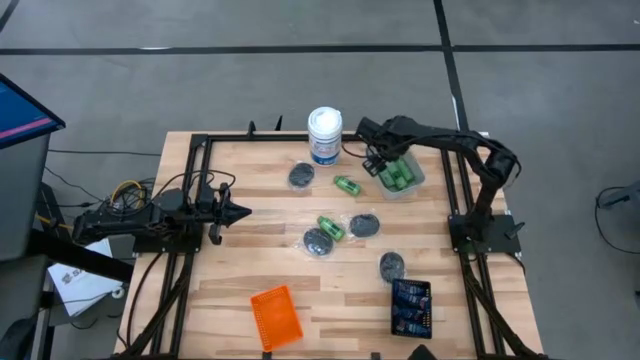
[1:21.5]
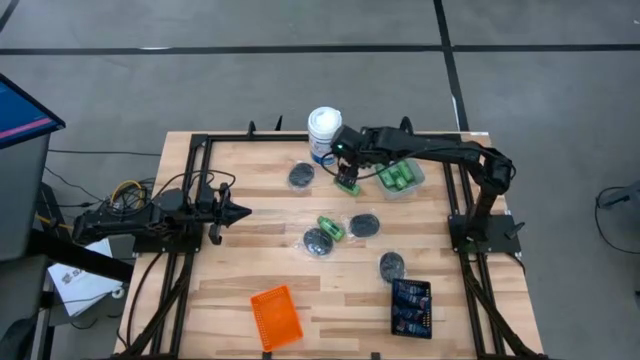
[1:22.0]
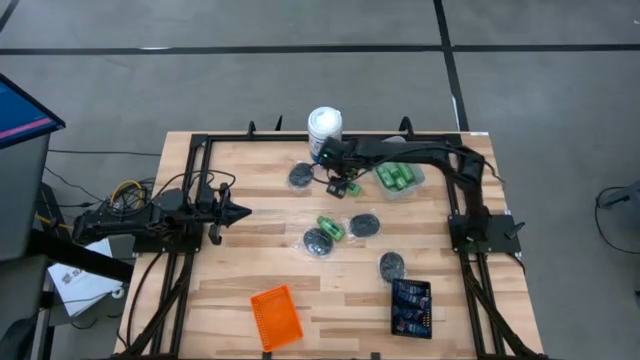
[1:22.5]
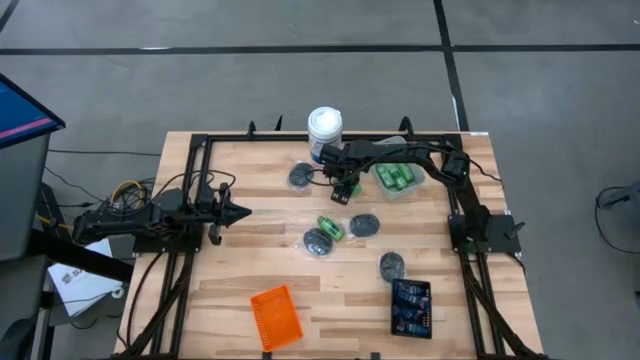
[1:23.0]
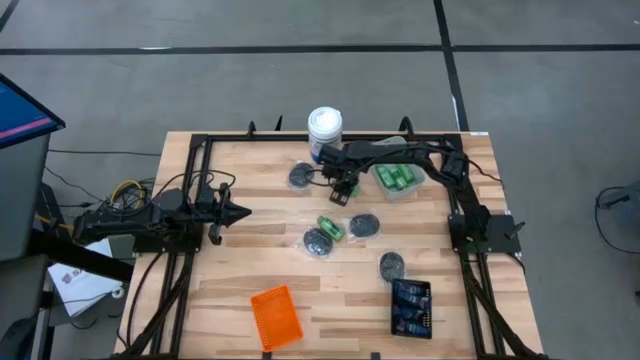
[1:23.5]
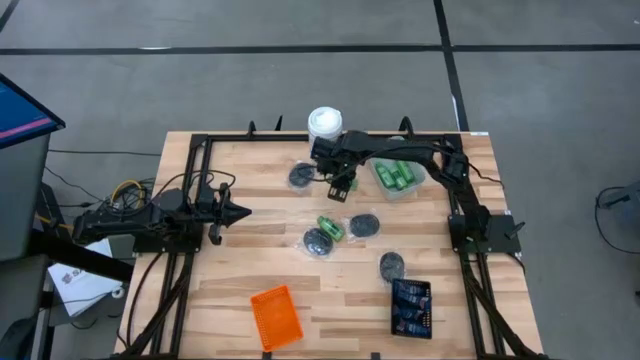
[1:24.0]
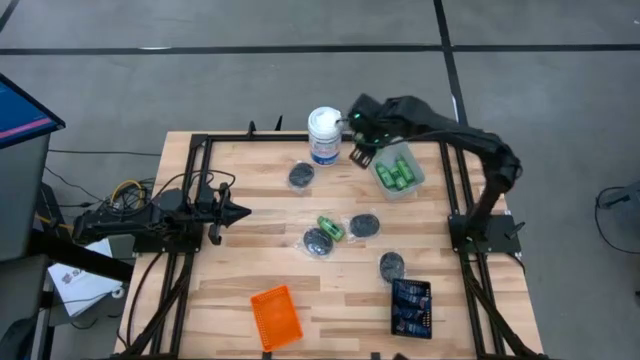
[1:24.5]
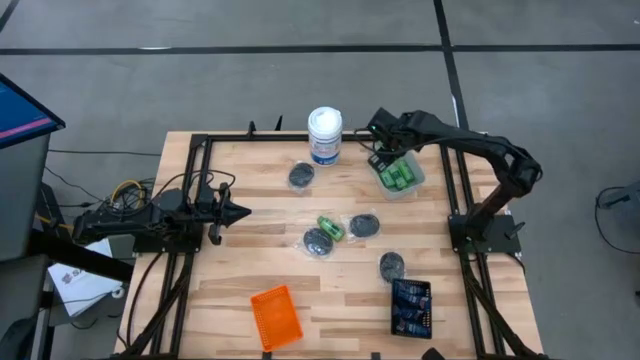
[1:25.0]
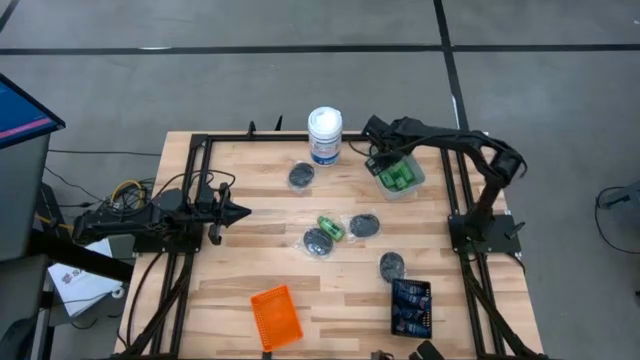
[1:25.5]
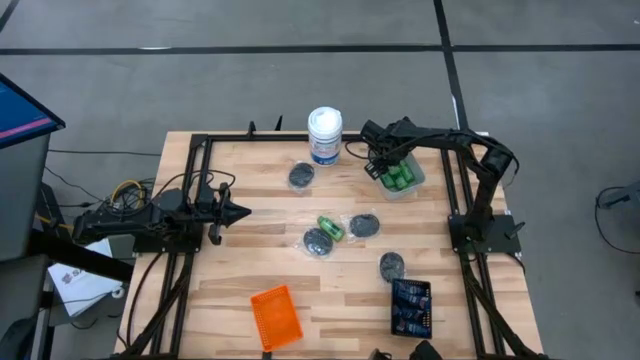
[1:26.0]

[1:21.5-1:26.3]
Task: Pick & Place Travel size toiletries
Put the green shampoo into the gray basket

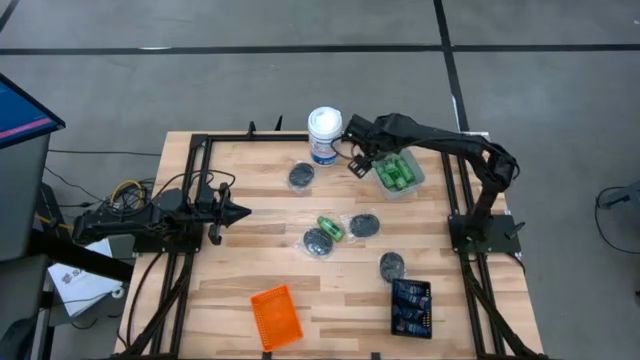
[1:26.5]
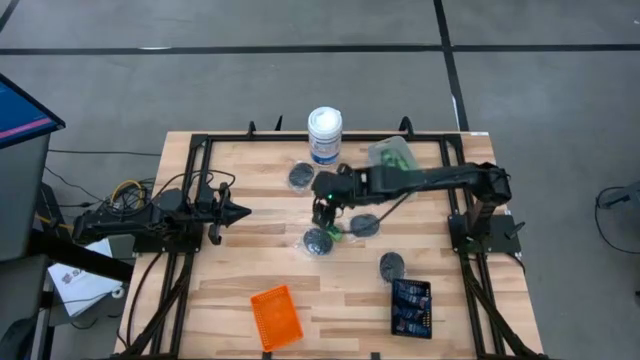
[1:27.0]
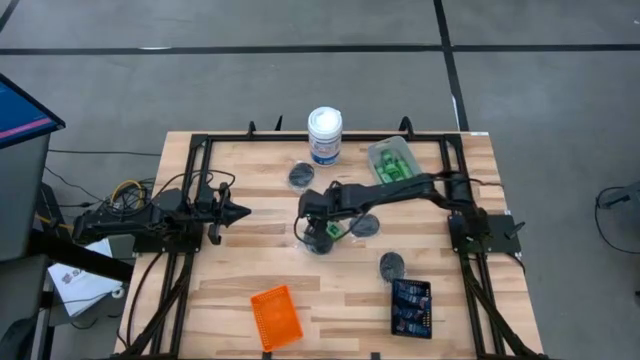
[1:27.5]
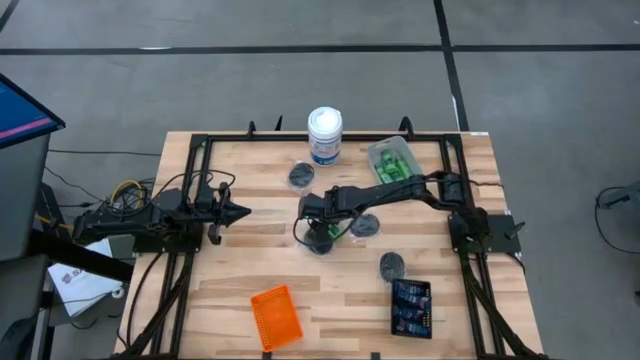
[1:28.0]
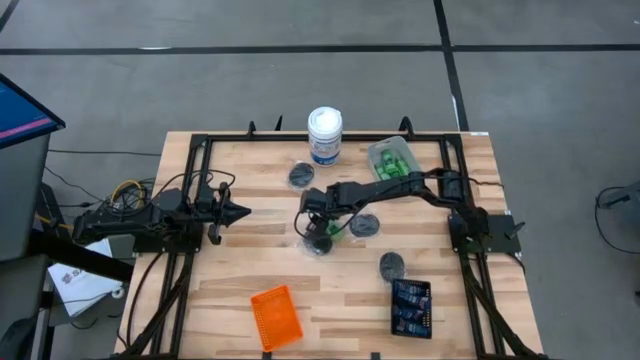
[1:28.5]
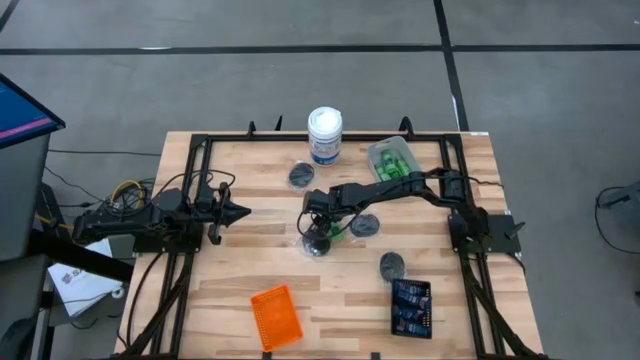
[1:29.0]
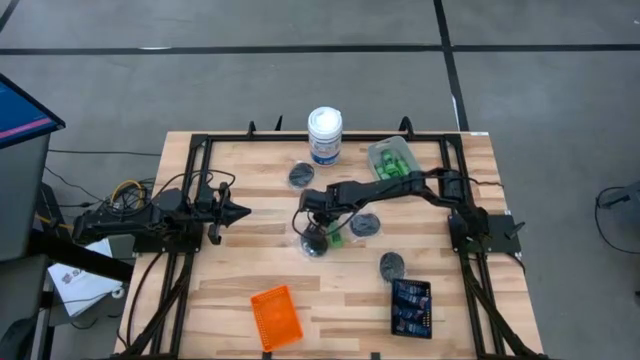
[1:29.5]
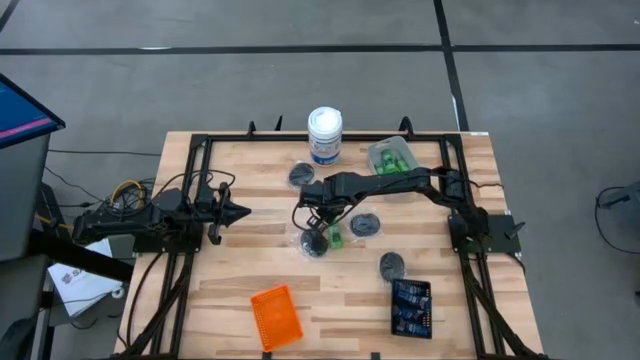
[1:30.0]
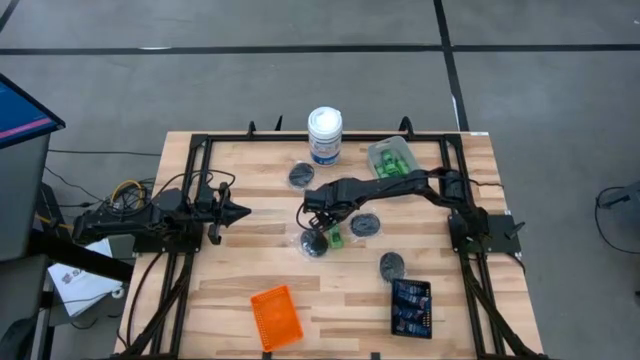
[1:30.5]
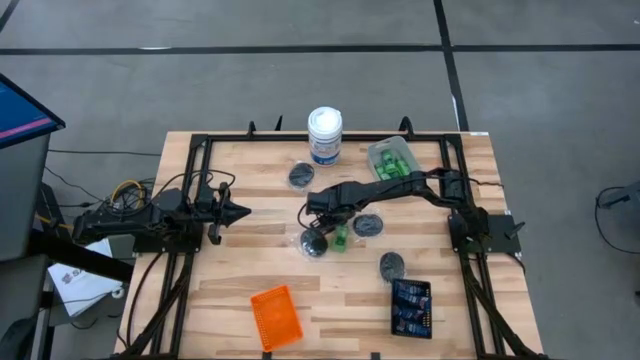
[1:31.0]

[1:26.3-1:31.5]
Put the green shampoo into the gray basket

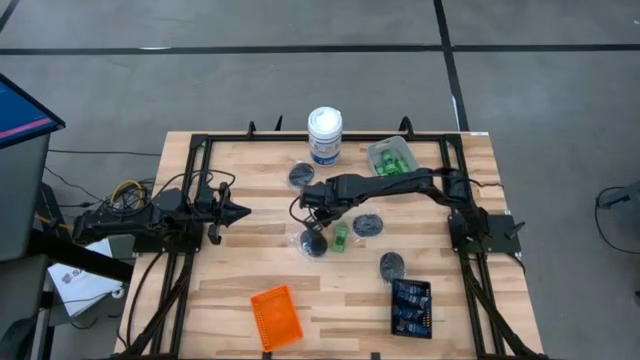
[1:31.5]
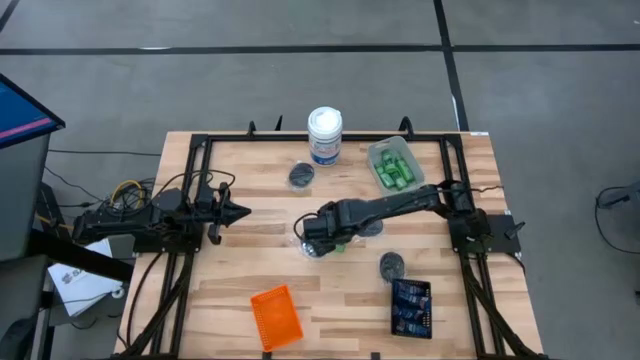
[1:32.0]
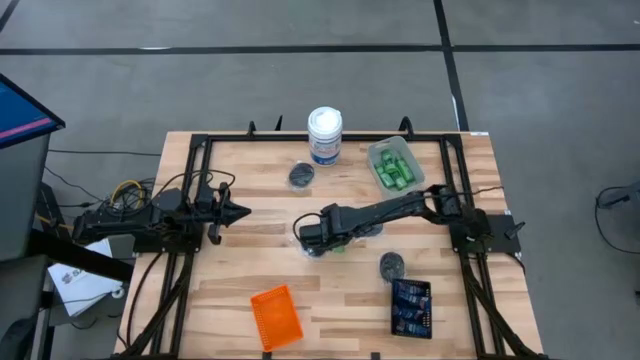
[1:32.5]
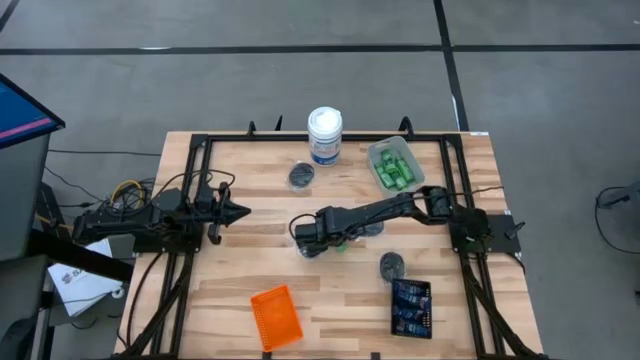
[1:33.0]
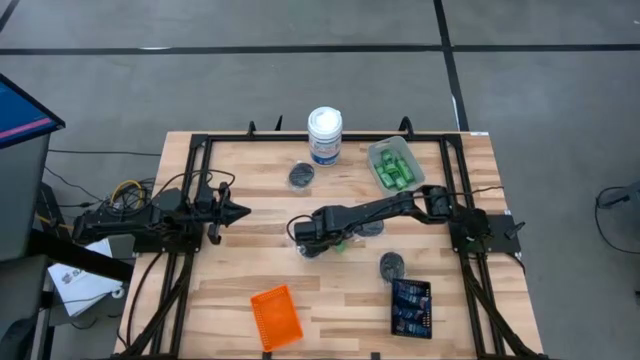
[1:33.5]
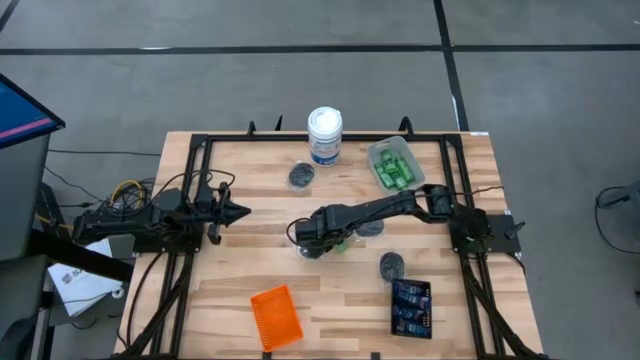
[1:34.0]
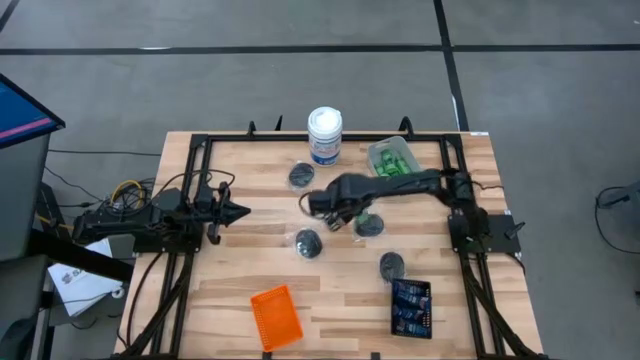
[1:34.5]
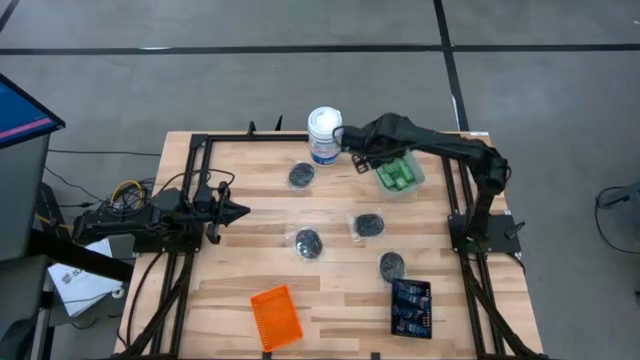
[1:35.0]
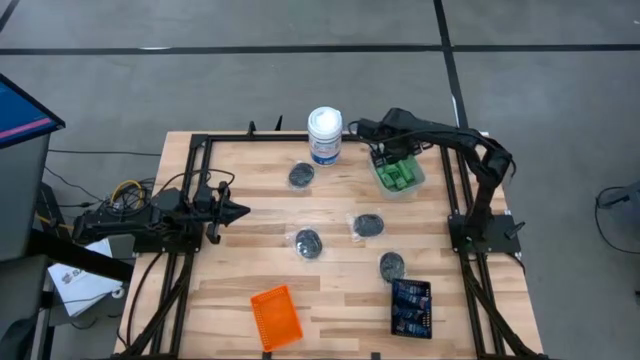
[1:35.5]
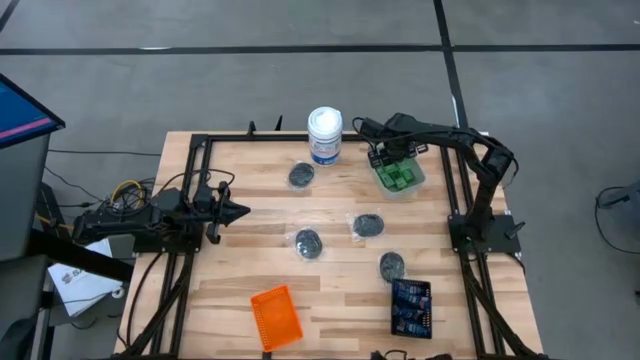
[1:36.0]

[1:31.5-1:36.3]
Put the green shampoo into the gray basket

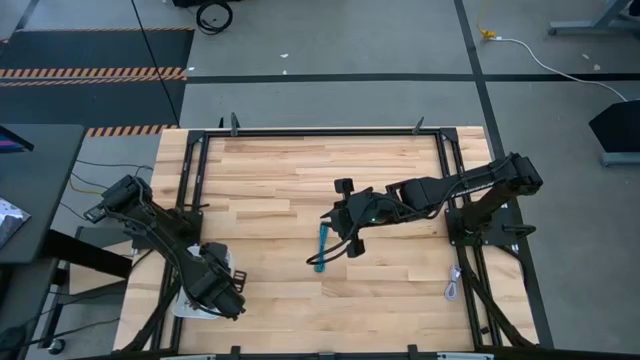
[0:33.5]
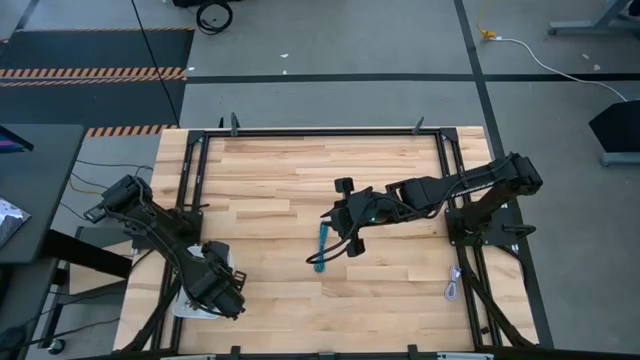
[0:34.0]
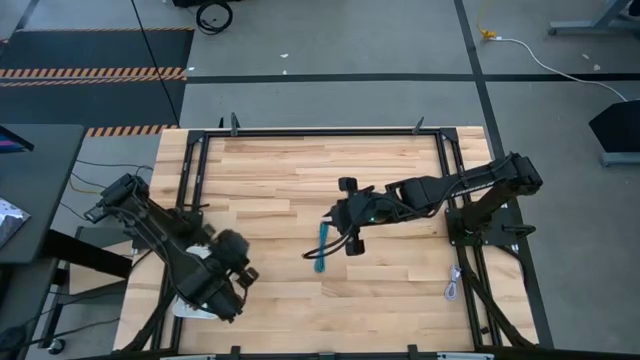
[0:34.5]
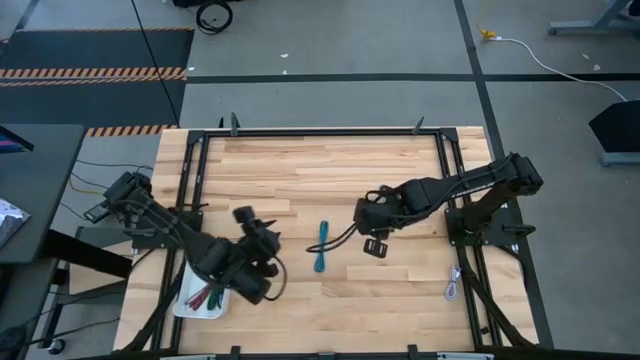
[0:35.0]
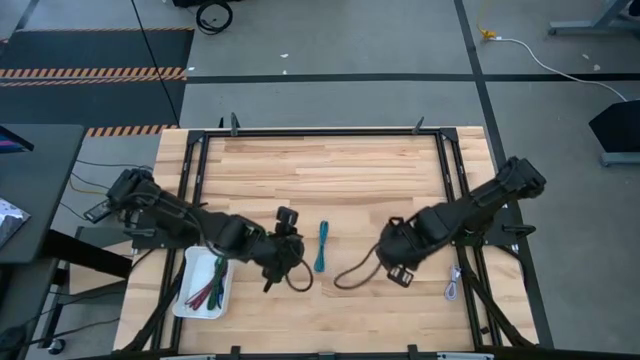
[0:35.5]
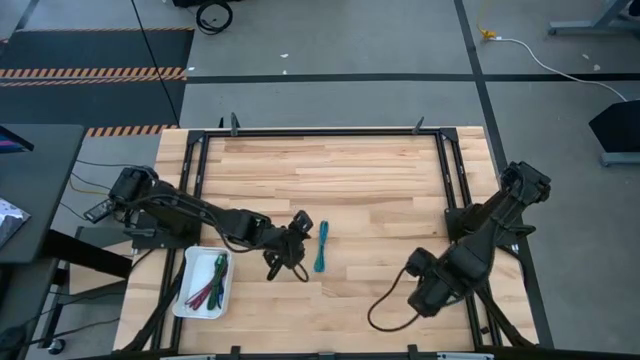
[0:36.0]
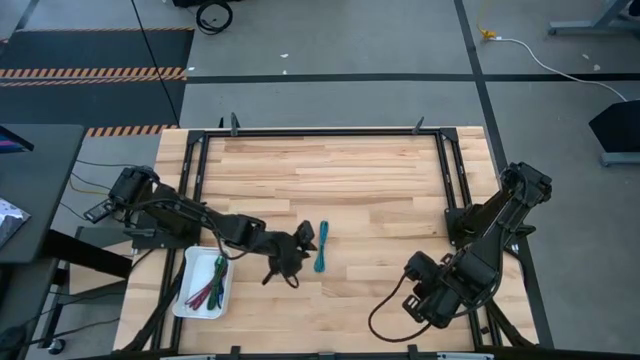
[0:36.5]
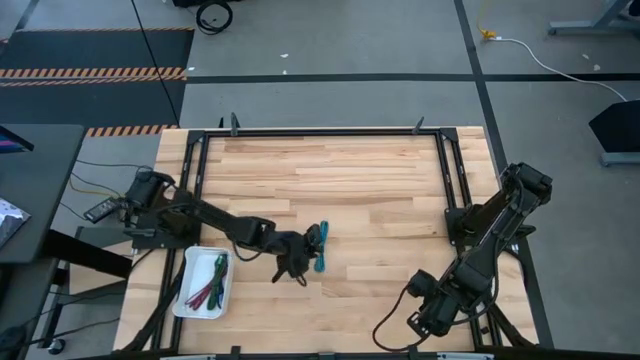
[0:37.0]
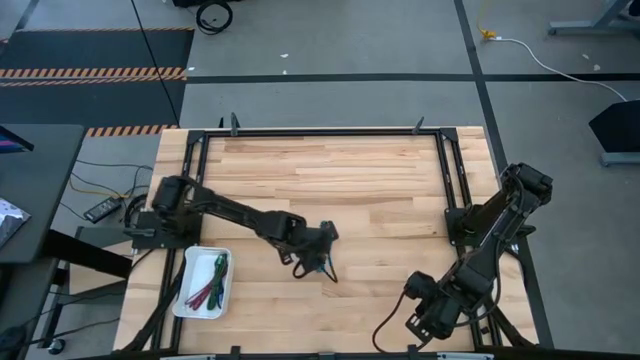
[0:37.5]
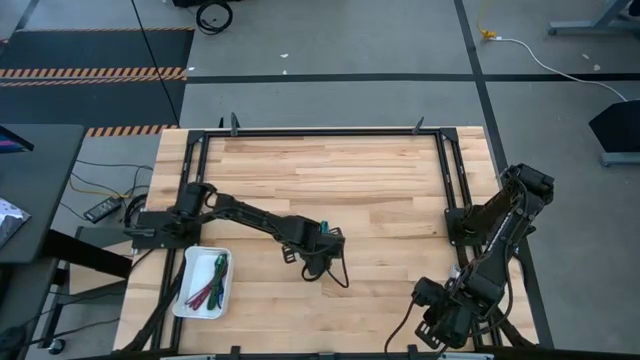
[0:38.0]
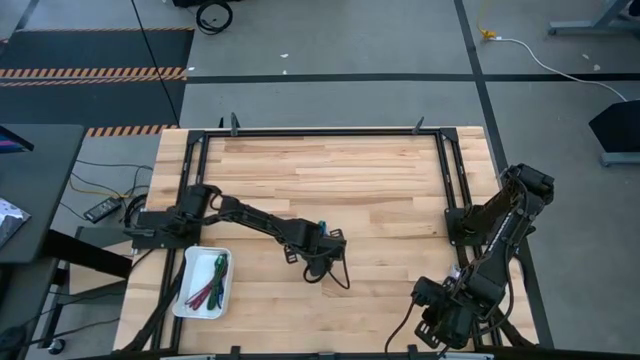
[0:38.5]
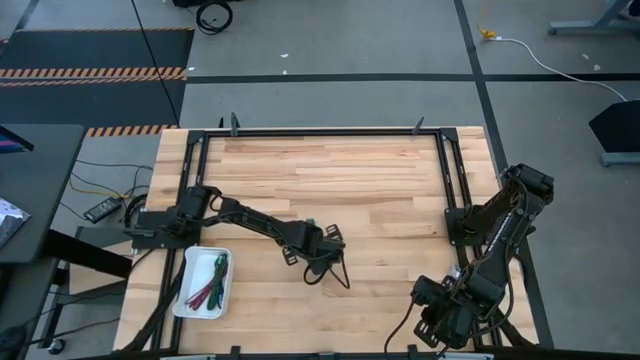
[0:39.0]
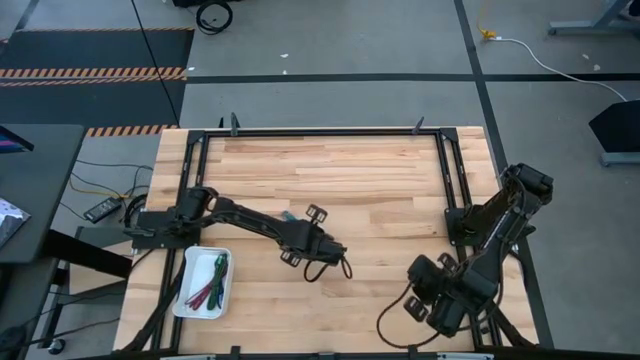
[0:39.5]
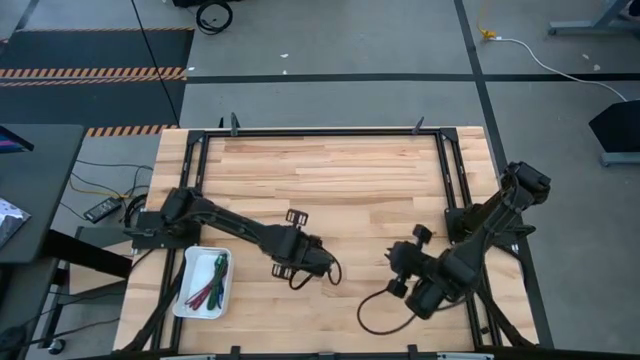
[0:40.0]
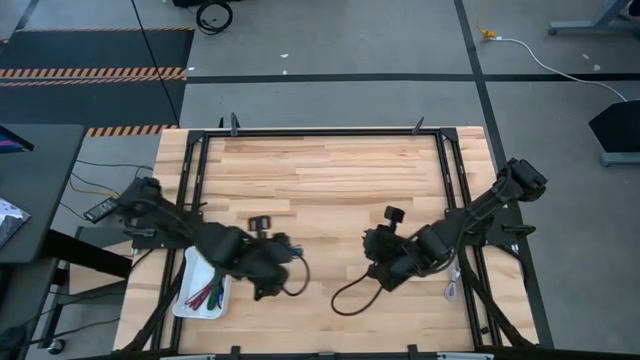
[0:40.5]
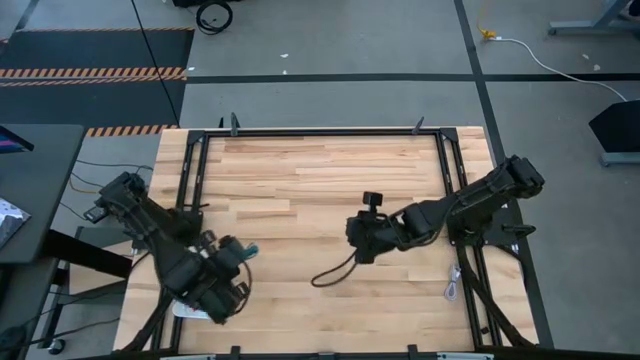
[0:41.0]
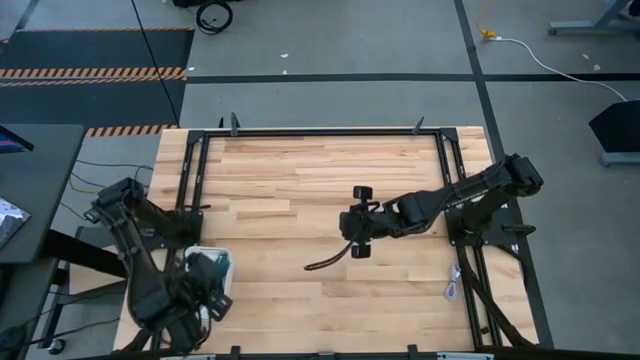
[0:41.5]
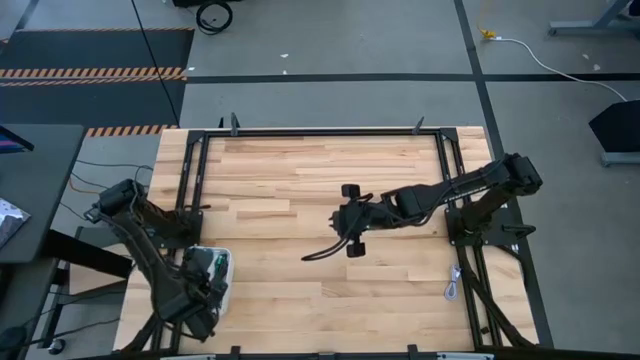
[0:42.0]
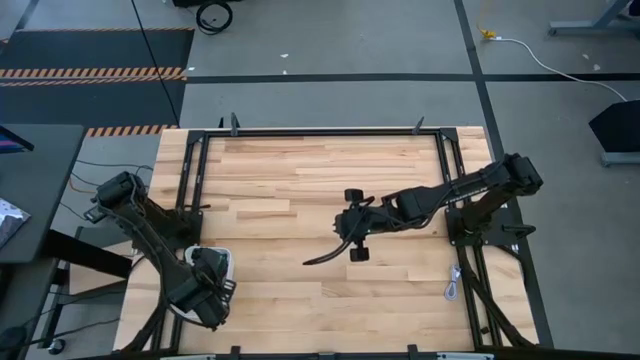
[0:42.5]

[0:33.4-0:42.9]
Task: Pick and place USB-C Cables
Put the blue charger cable into the white bin
